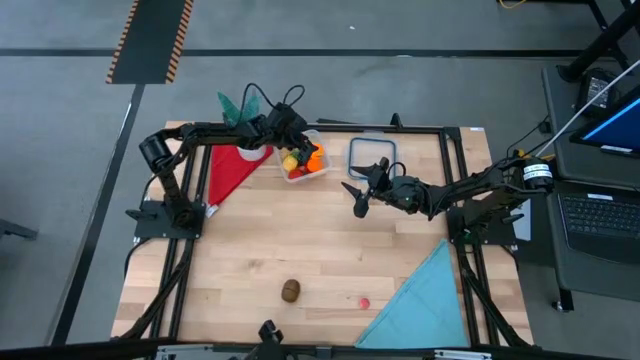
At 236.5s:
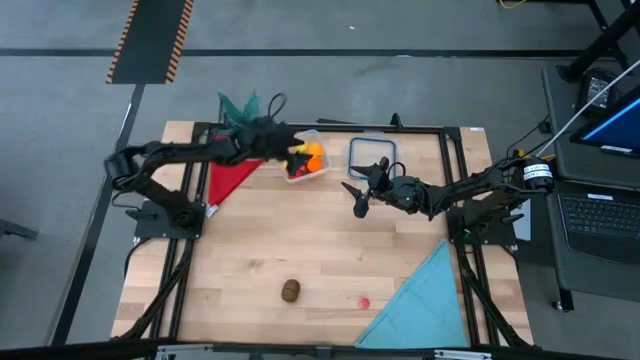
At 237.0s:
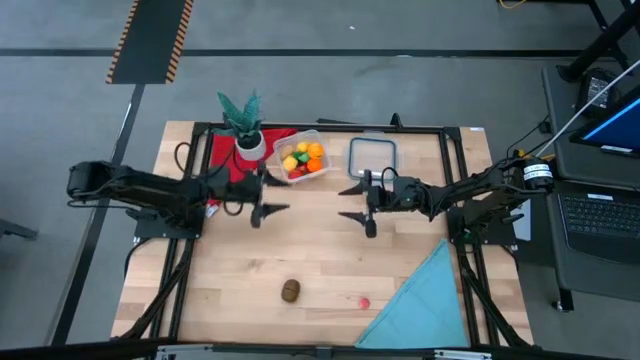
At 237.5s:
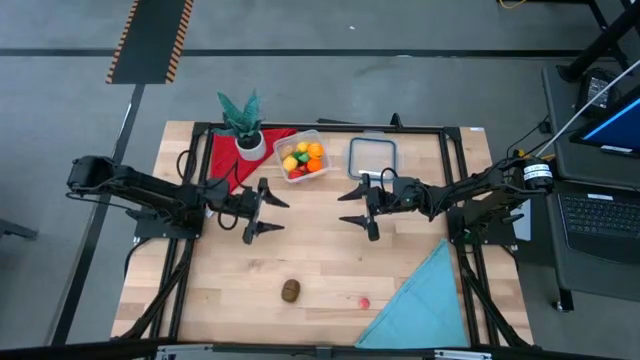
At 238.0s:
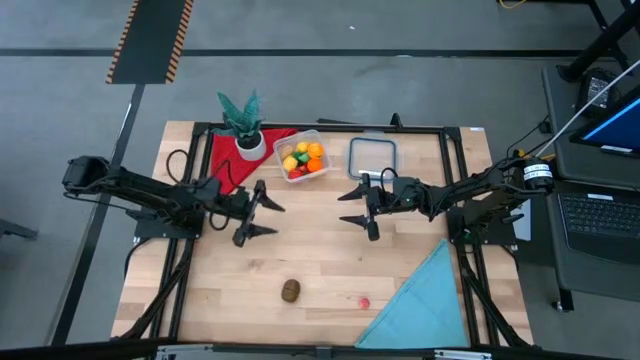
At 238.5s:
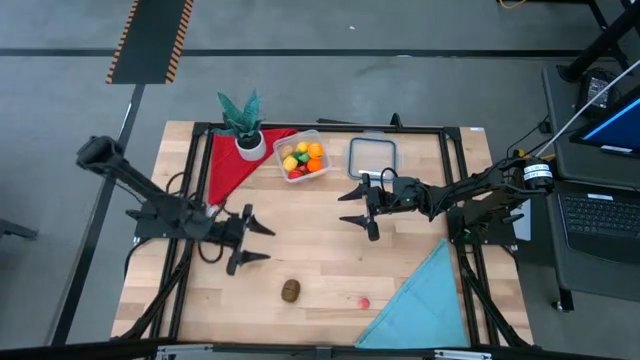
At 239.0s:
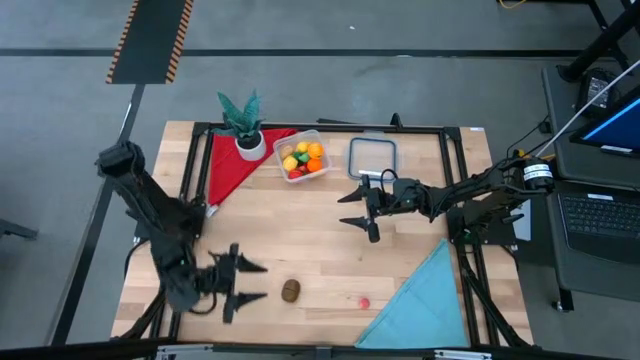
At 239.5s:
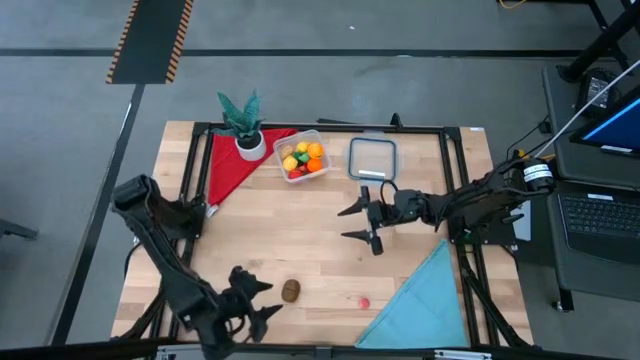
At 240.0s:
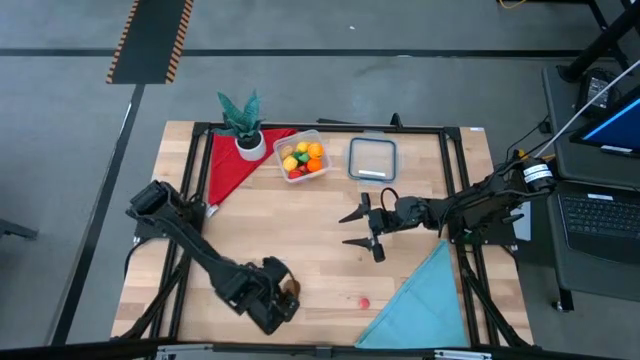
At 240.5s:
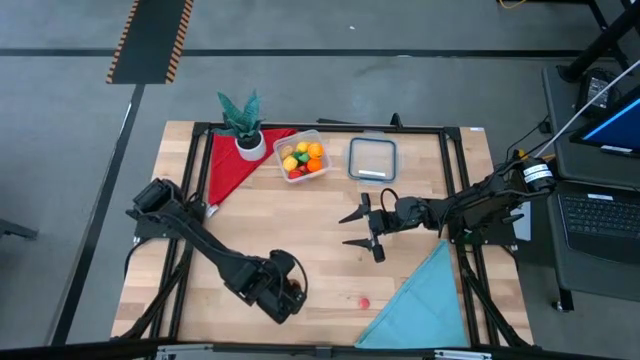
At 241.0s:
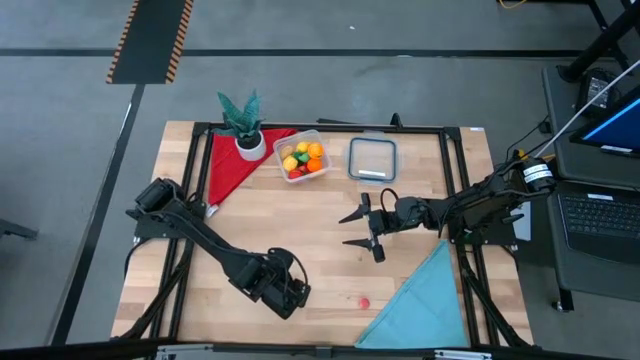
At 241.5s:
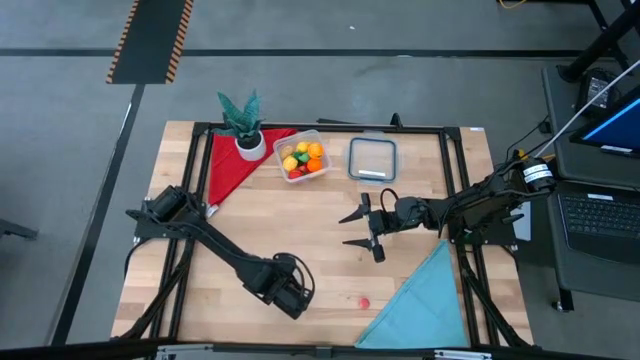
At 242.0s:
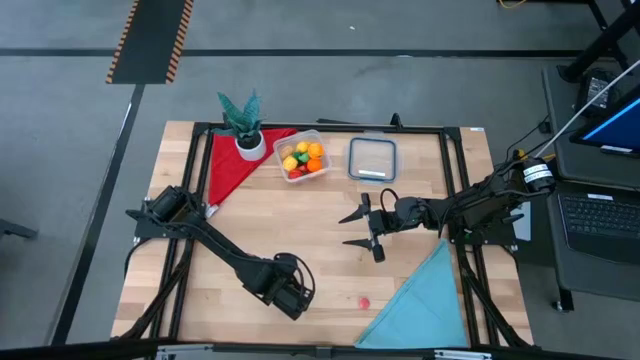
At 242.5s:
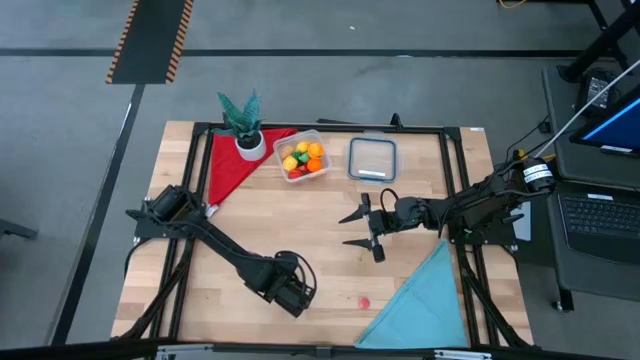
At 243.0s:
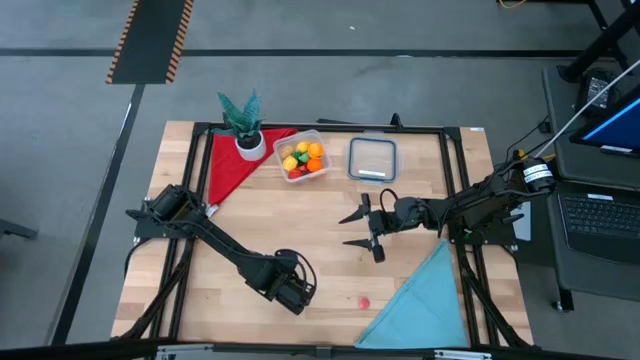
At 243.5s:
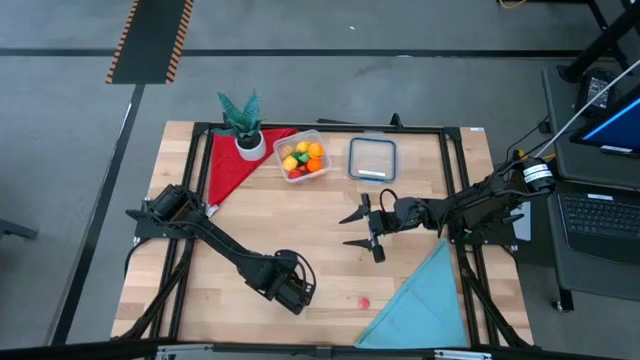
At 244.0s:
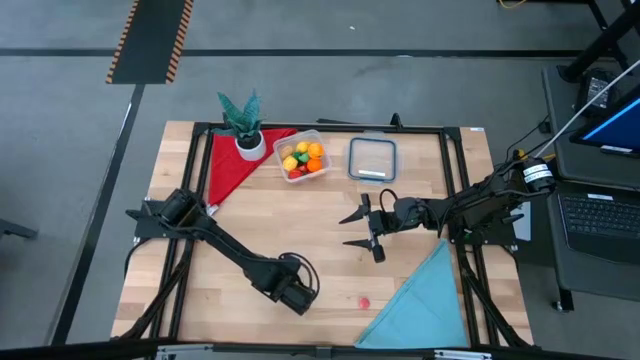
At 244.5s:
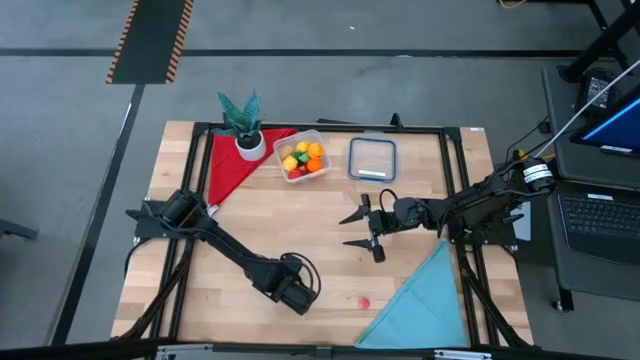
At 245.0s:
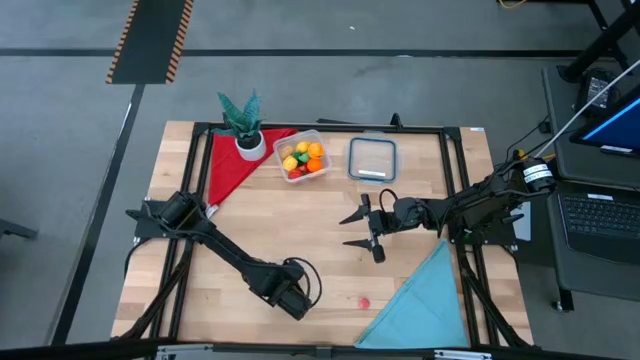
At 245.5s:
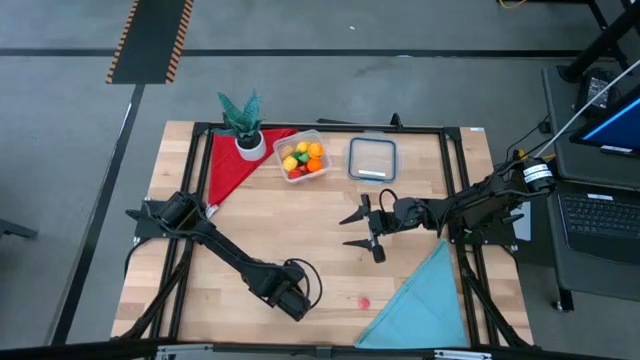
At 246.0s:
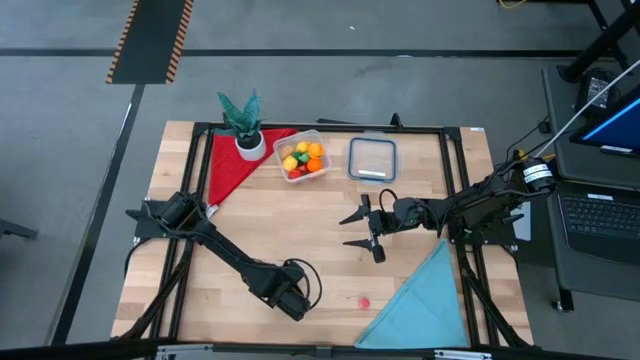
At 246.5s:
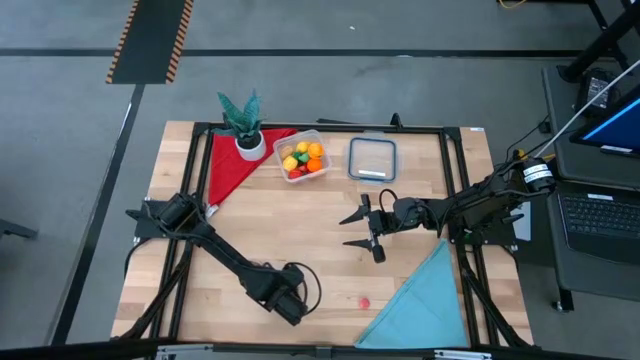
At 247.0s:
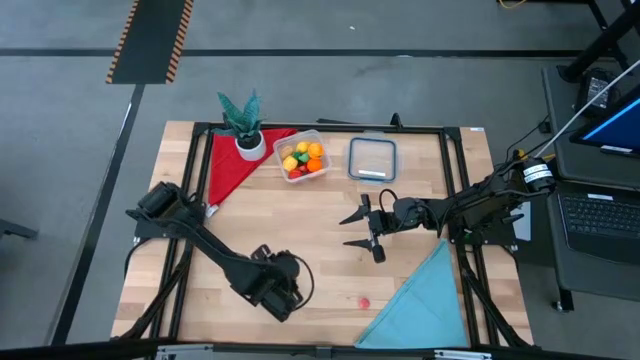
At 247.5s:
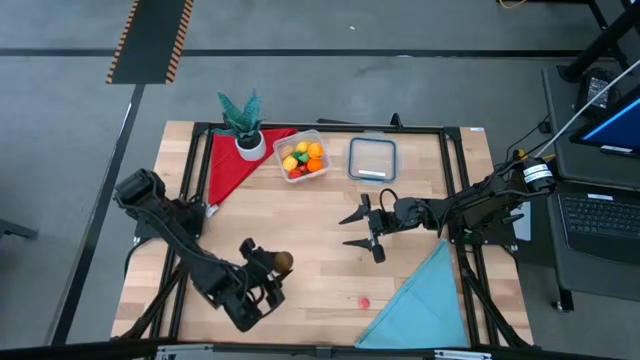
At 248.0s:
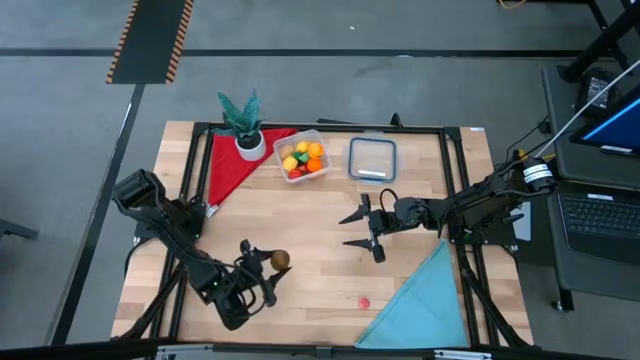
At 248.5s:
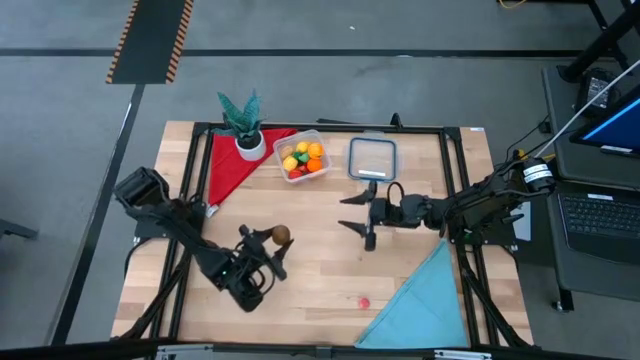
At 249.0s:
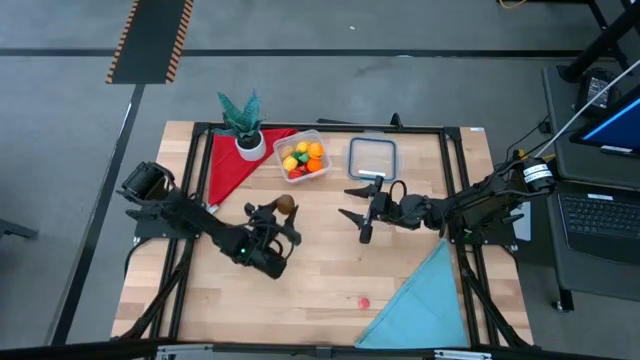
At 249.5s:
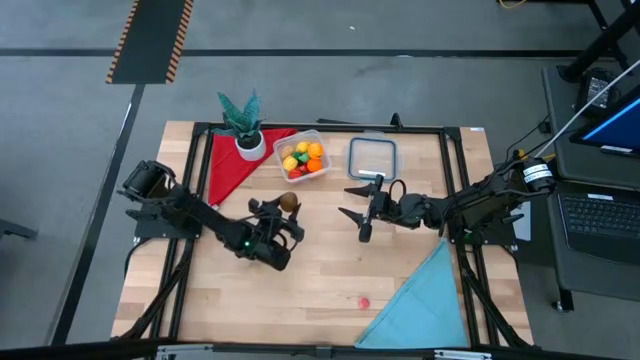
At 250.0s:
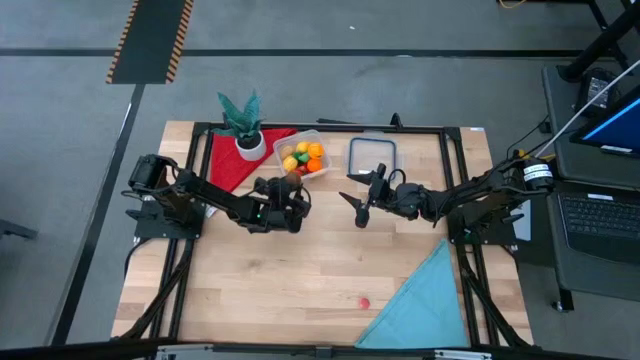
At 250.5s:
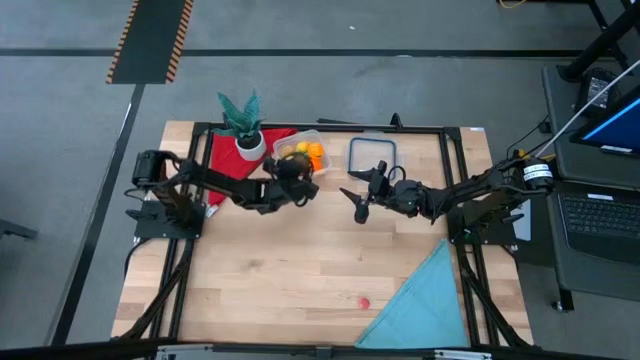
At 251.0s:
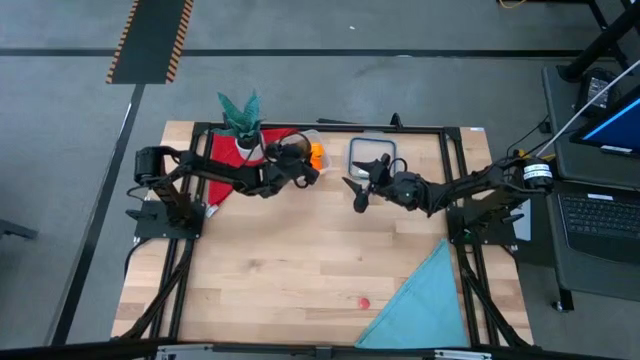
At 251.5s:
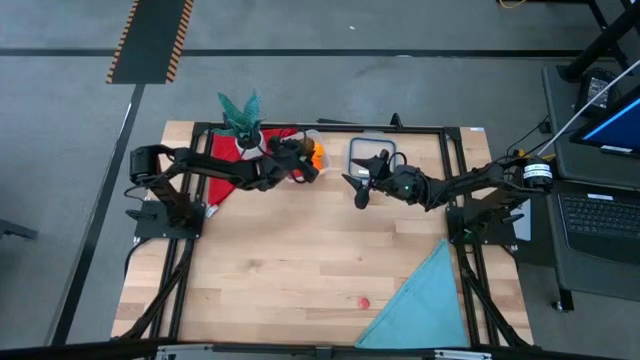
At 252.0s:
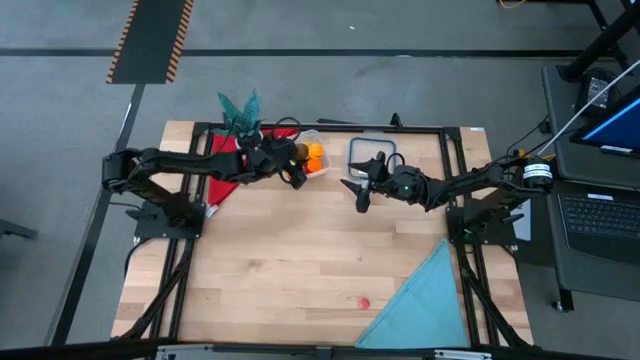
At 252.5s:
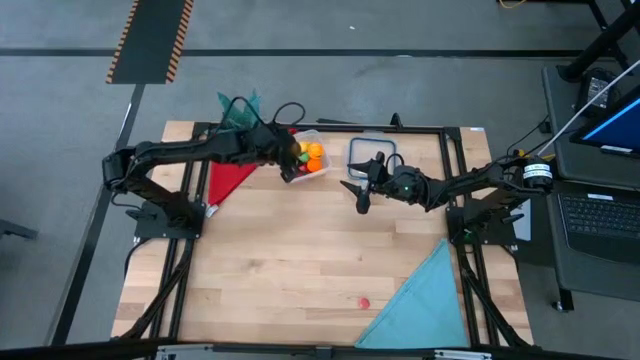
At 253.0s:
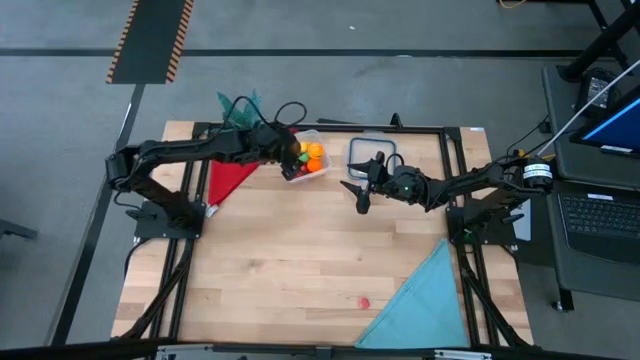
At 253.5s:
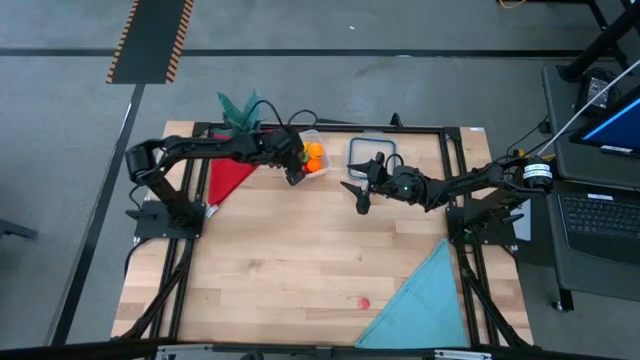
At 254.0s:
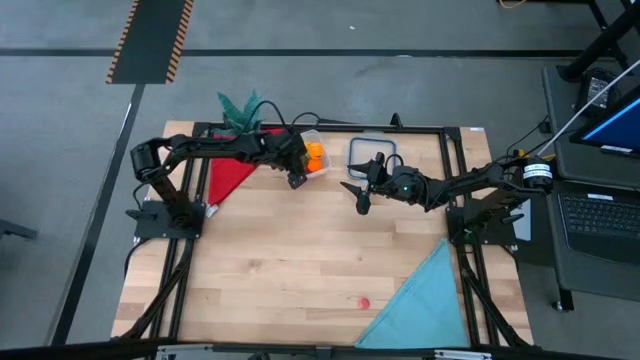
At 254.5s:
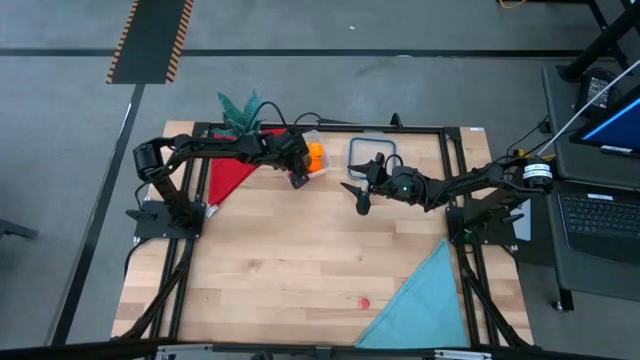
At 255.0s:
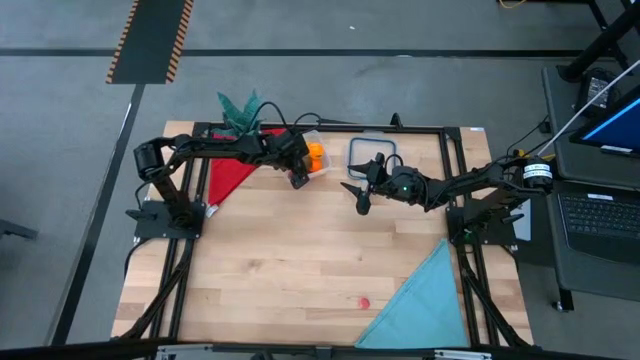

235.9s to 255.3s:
Task: Pick and placing Produce into tupperware
Put the kiwi into the transparent bin

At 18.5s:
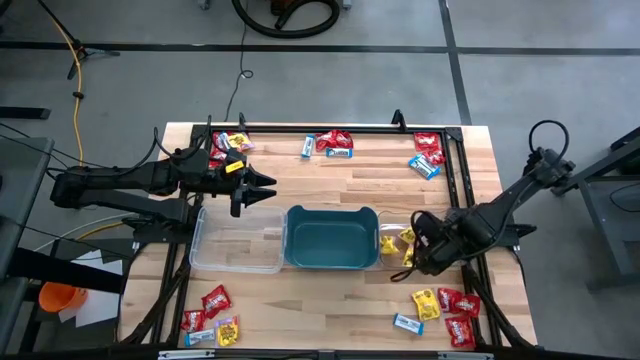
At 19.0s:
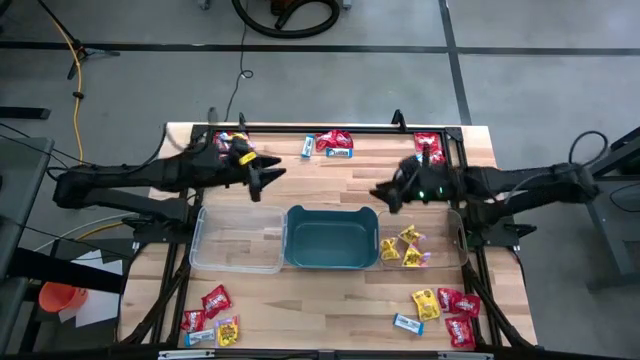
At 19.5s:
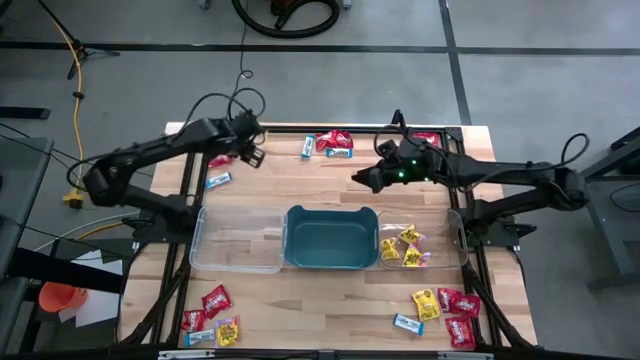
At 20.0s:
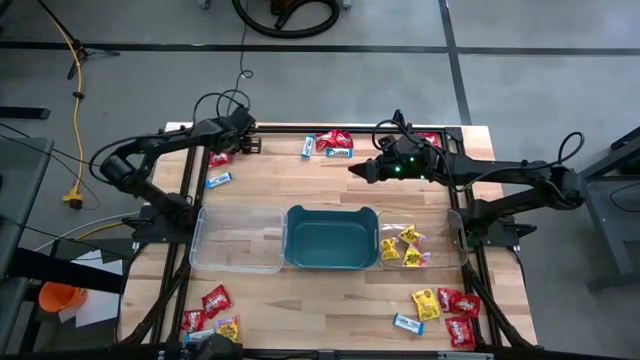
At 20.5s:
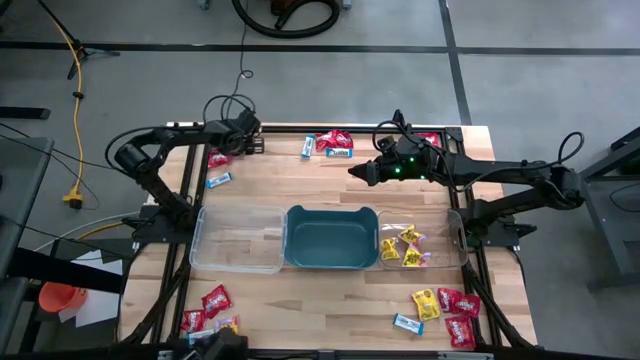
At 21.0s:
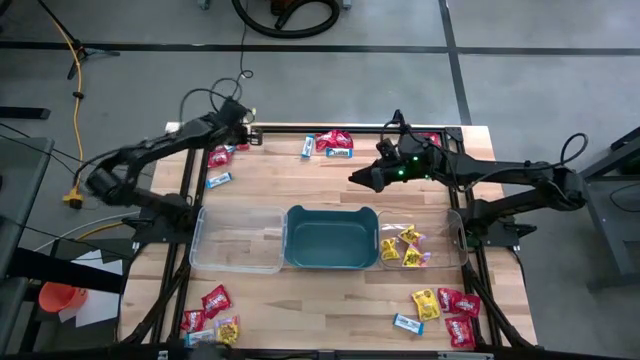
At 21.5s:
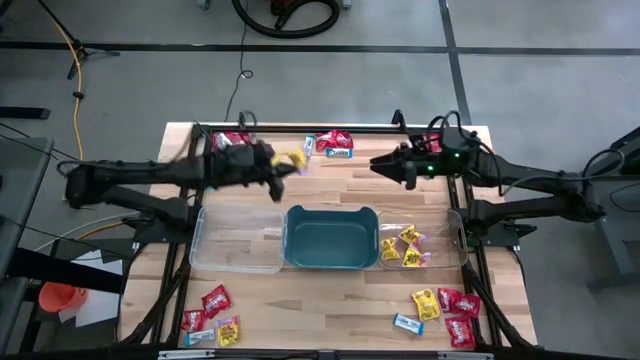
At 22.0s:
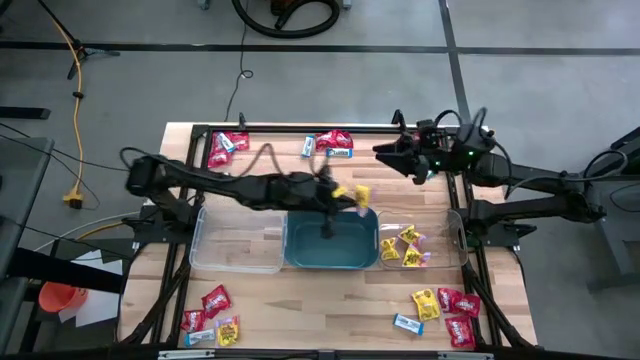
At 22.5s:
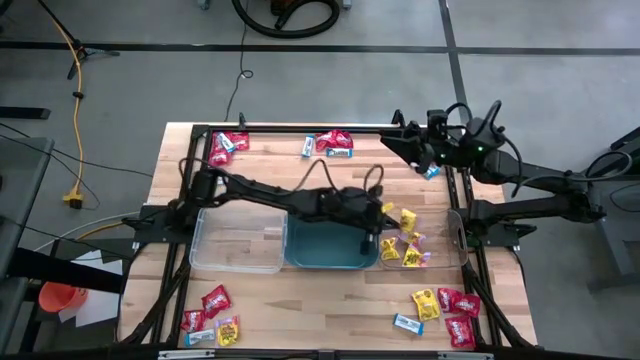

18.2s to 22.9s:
Task: Sort candy
Put the yellow candy into the right transparent bin
